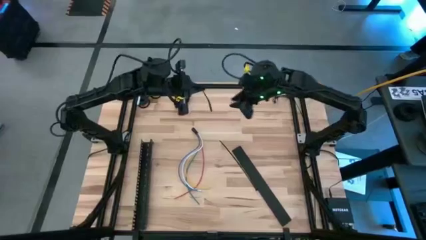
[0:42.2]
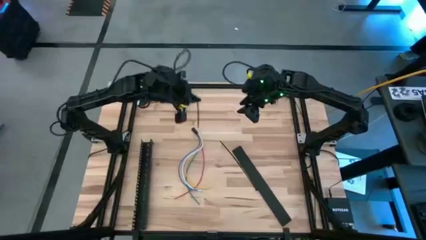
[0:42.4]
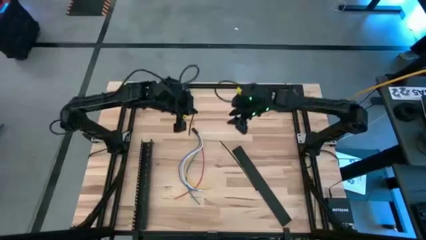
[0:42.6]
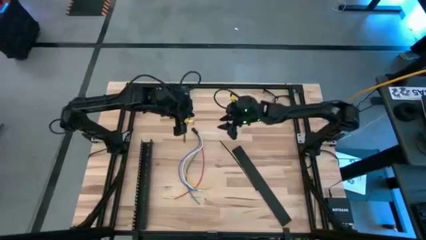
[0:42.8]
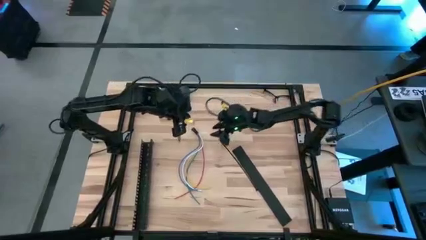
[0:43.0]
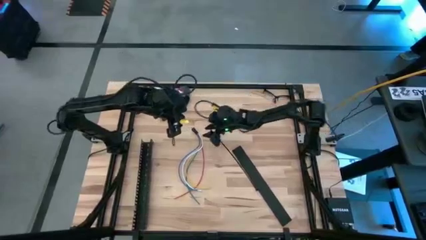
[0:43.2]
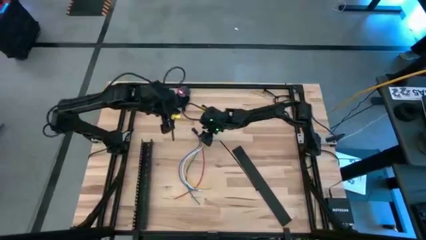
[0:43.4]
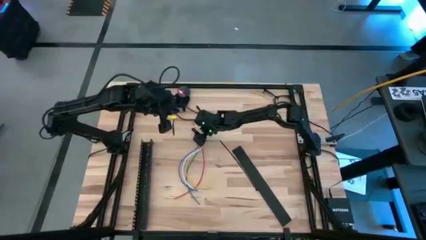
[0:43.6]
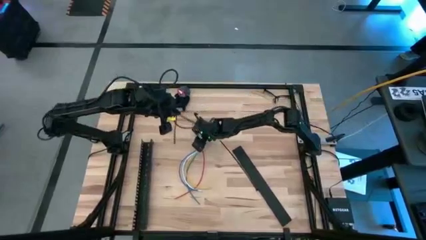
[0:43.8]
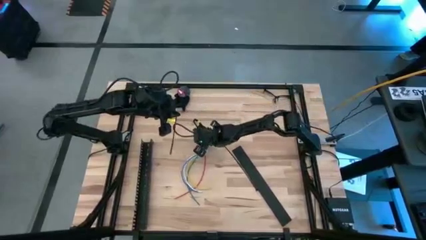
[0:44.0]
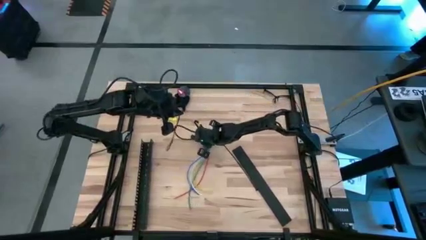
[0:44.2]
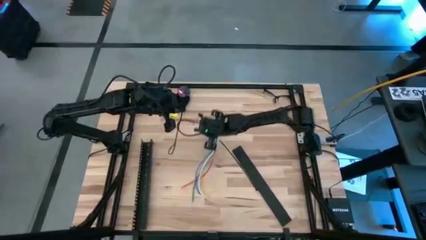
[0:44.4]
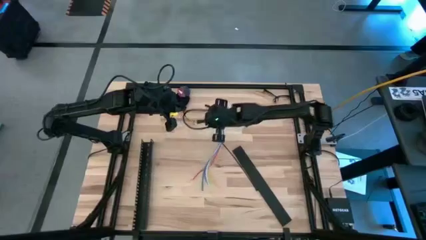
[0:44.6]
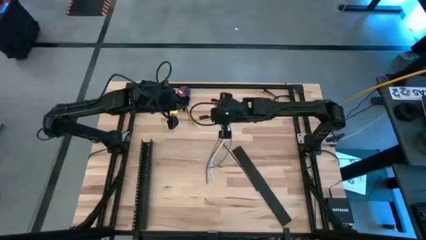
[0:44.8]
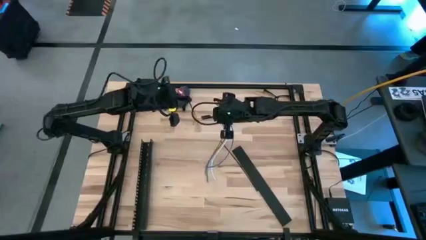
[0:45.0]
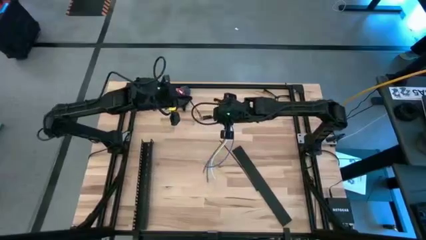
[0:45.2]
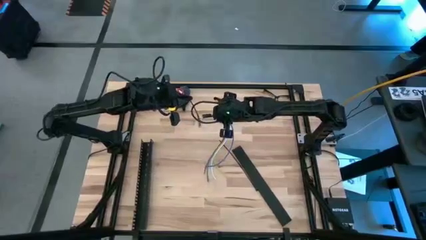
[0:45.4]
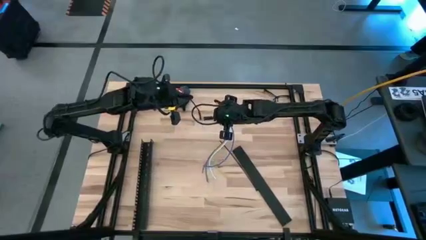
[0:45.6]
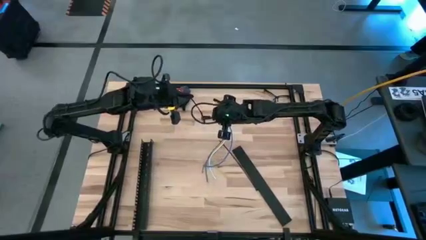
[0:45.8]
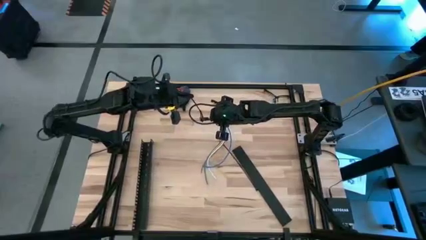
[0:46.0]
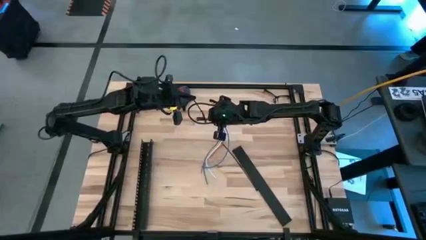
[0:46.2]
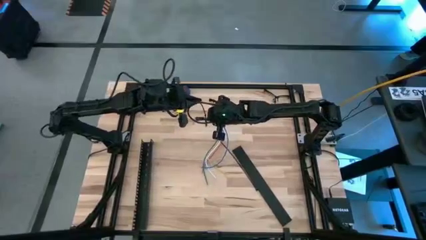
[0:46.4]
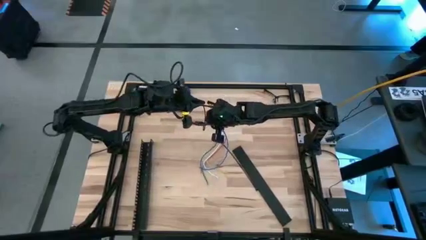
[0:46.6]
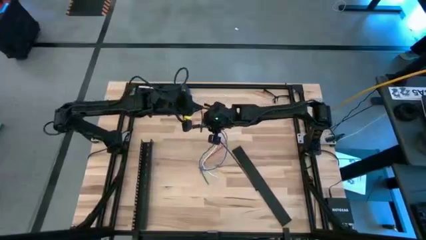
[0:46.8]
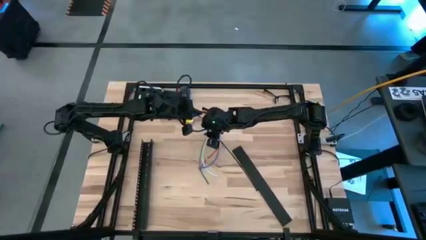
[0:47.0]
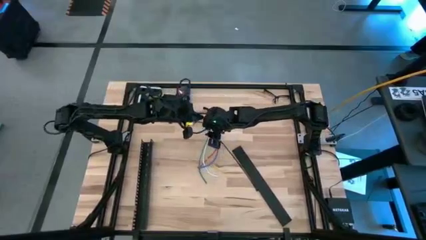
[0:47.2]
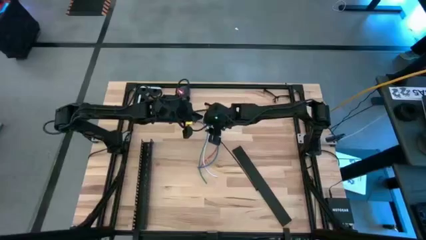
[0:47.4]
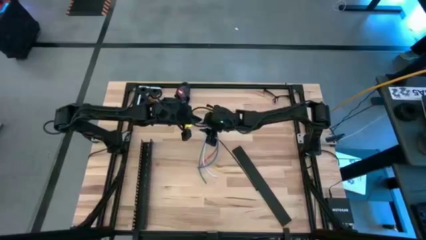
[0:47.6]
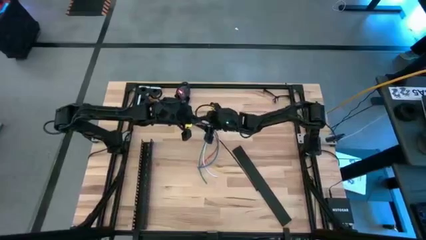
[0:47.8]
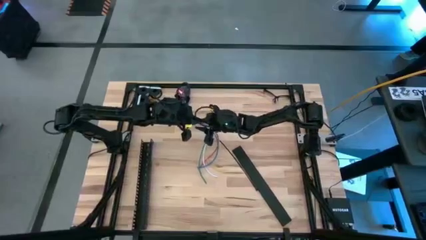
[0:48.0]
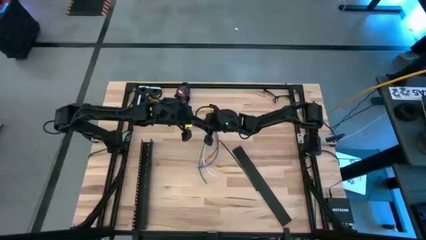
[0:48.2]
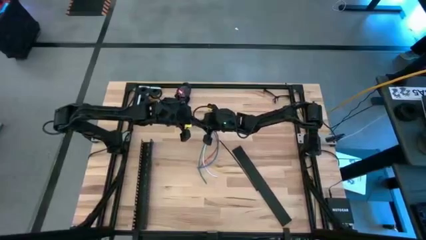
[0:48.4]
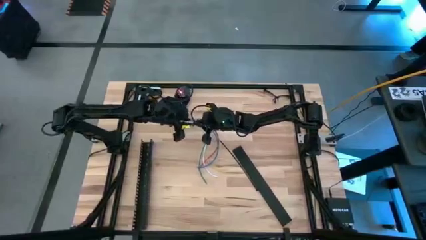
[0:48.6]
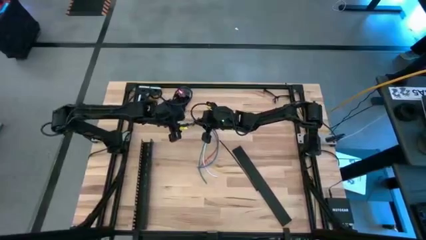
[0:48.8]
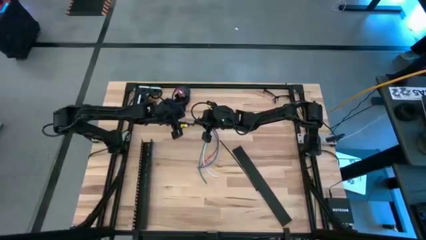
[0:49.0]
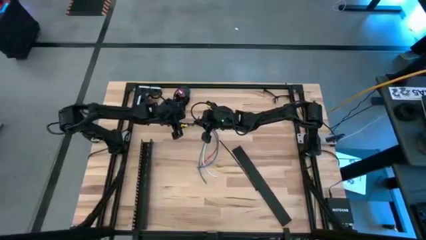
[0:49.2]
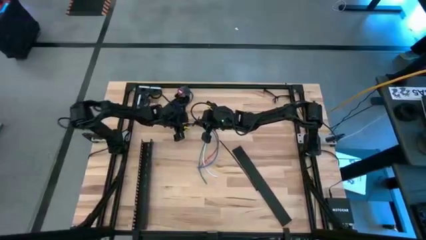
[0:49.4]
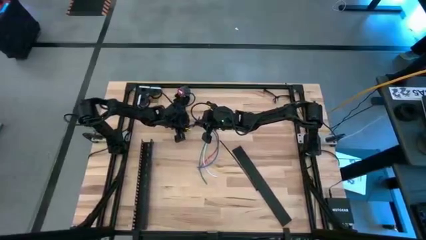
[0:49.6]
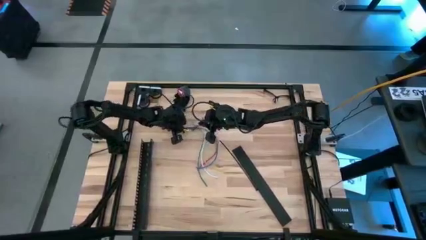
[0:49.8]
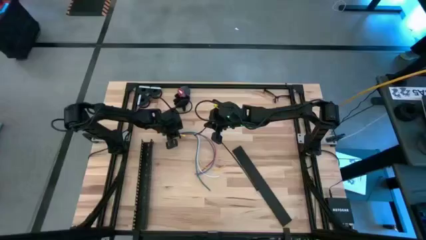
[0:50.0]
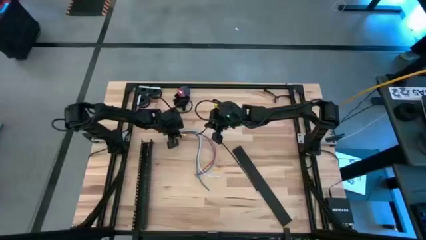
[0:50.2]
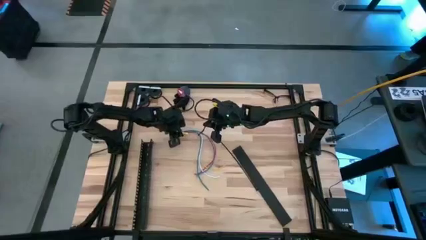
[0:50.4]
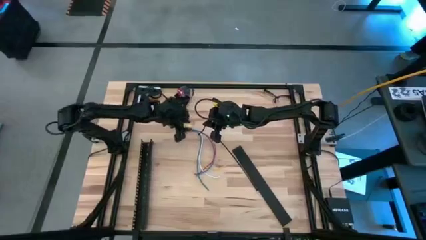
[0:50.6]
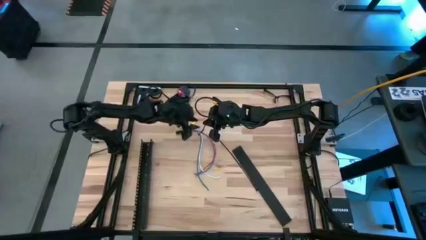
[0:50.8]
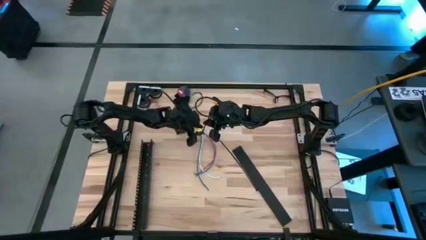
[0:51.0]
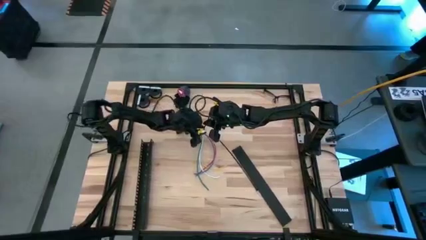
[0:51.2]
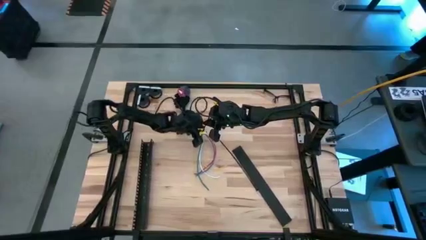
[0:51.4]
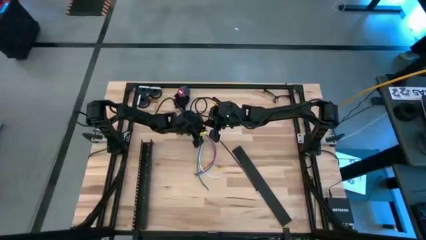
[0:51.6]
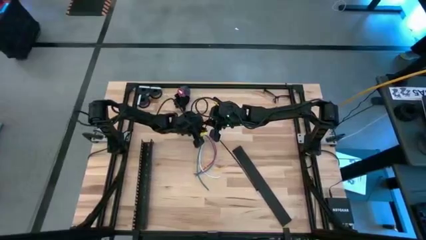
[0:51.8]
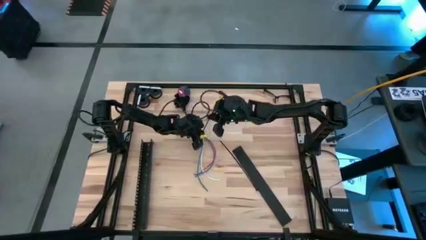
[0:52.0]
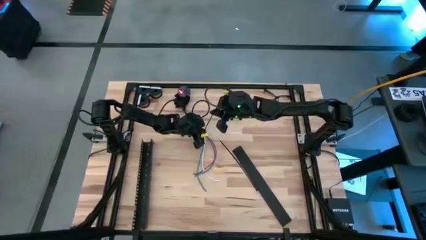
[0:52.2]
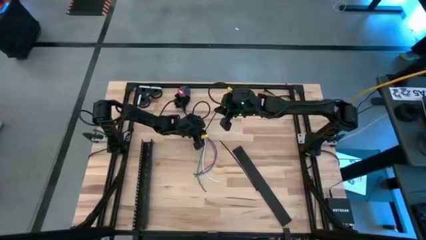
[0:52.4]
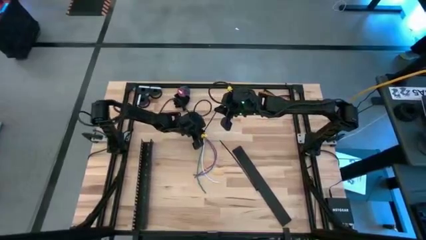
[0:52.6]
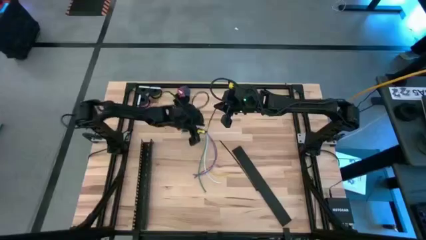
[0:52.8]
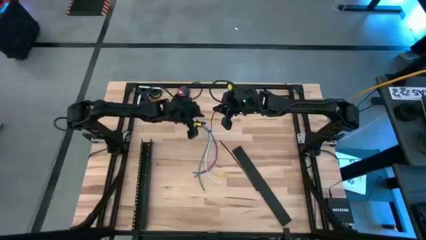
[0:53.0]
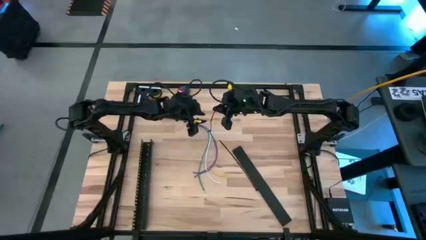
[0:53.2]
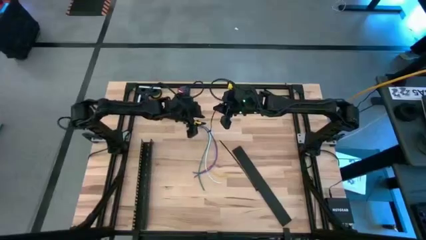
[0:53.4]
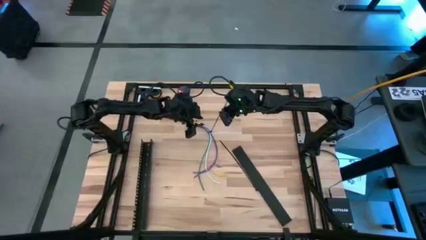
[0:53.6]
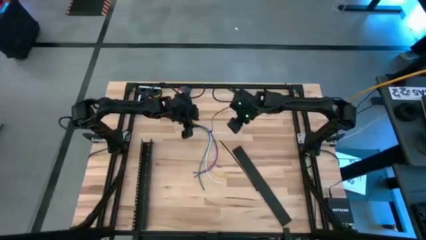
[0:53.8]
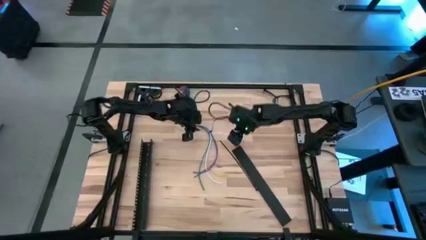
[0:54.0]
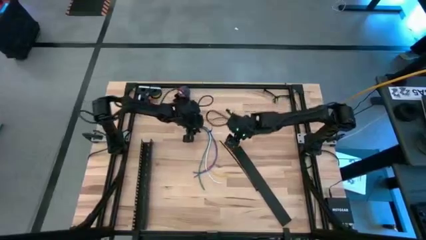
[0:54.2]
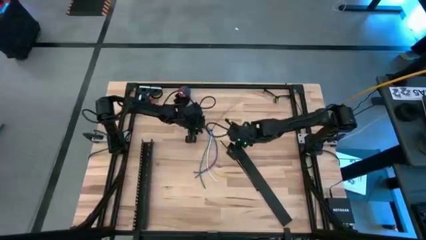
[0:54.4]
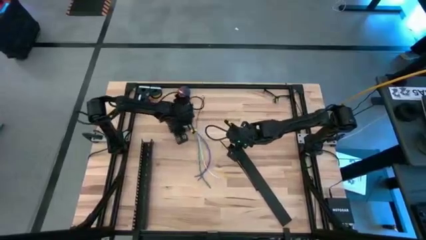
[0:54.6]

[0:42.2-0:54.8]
Task: Ziptie cables
Wrap the black zip tie loop on the cables
